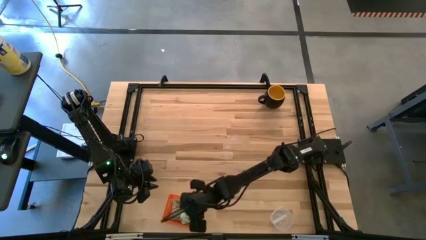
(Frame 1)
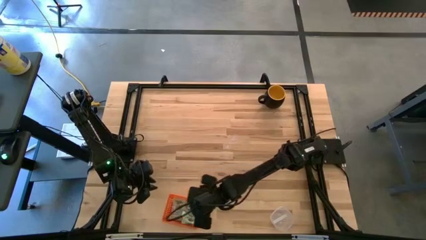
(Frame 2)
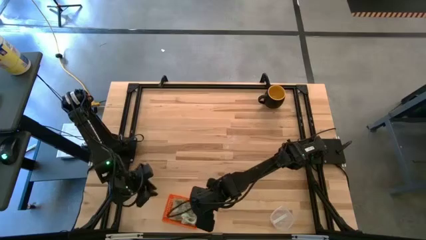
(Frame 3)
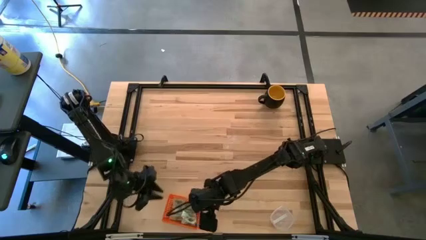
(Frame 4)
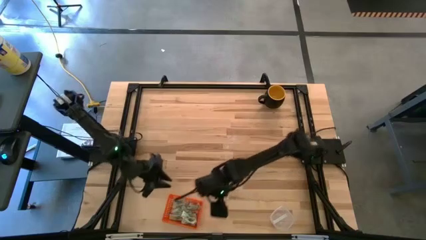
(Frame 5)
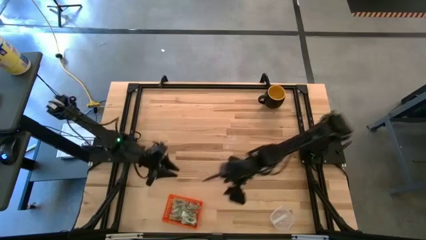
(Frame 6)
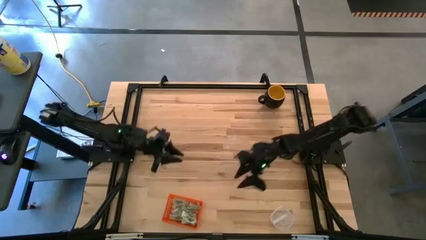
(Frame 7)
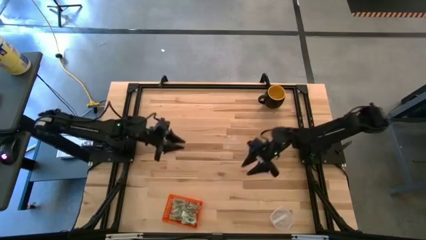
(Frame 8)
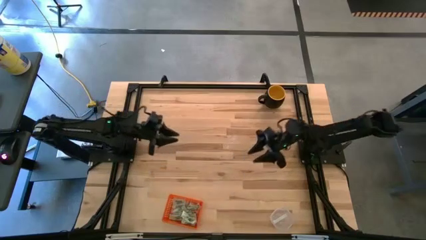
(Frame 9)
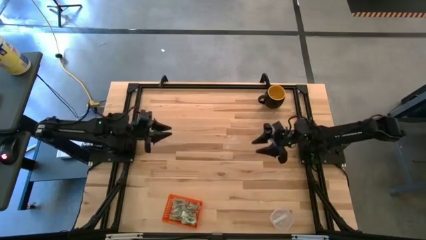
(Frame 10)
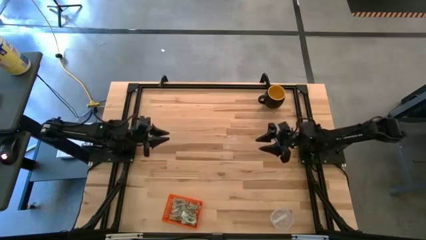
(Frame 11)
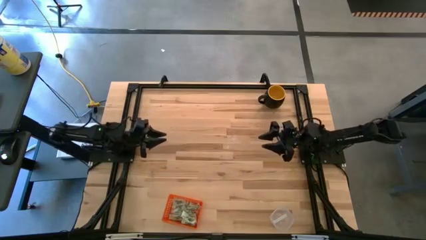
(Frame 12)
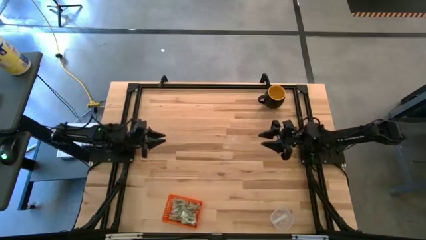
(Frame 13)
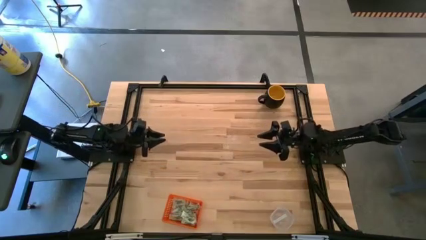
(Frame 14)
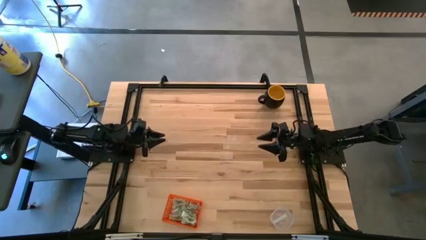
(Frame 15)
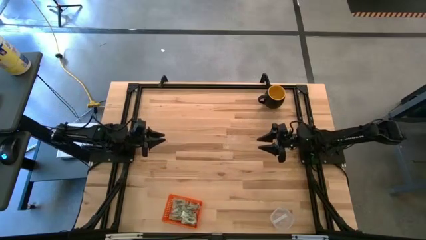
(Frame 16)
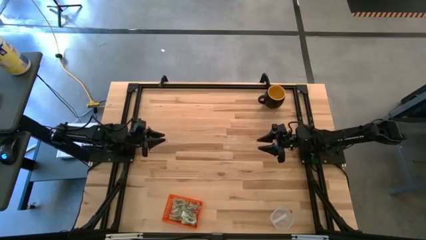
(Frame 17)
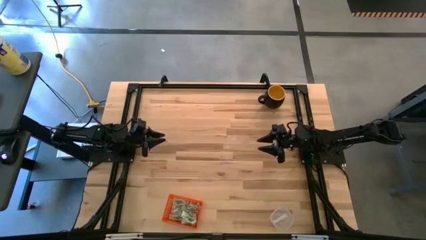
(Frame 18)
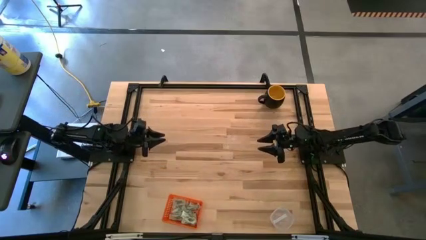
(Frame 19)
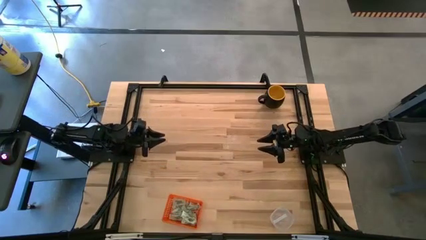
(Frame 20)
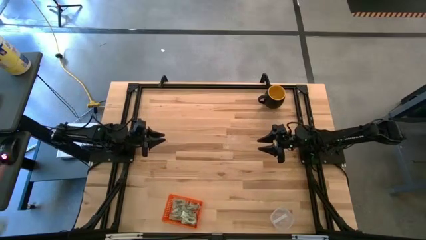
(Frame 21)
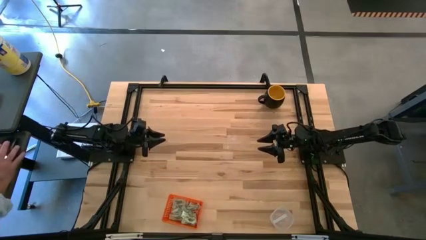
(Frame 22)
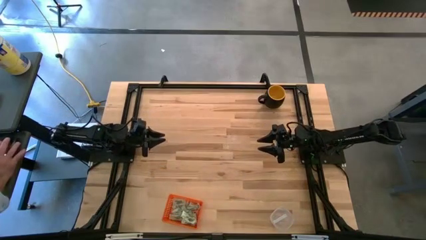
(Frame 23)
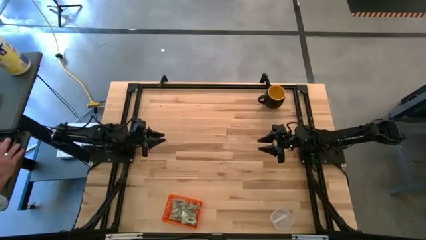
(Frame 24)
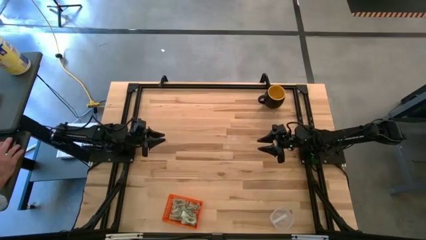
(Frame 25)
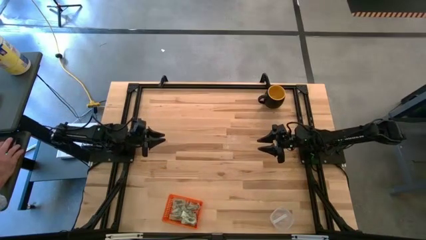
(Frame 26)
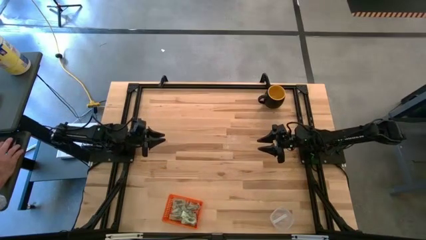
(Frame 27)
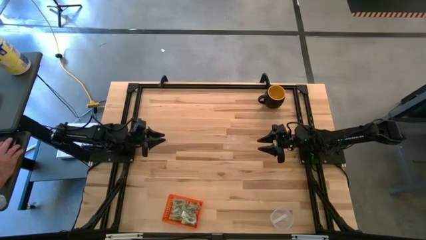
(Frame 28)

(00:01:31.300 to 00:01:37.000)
Task: Pick and place items into bin
Return to Home Position

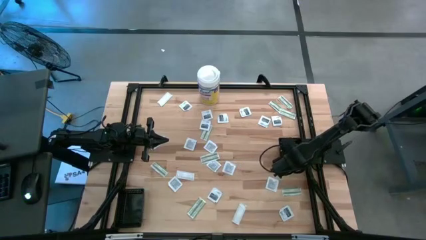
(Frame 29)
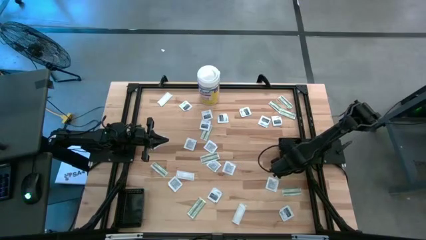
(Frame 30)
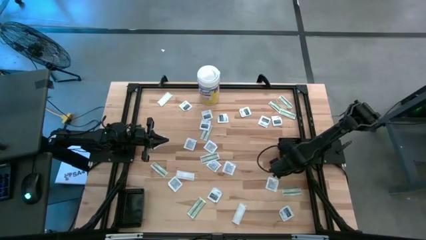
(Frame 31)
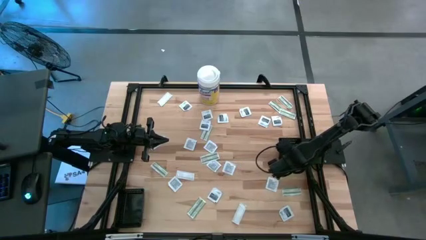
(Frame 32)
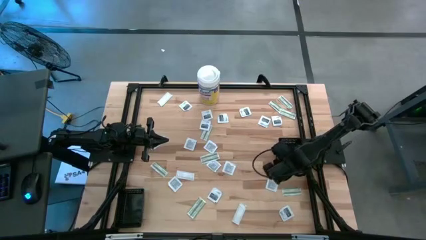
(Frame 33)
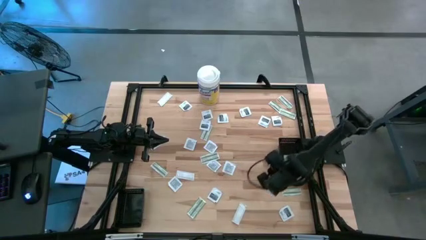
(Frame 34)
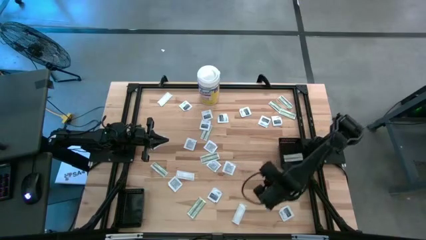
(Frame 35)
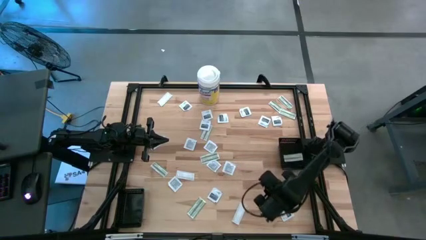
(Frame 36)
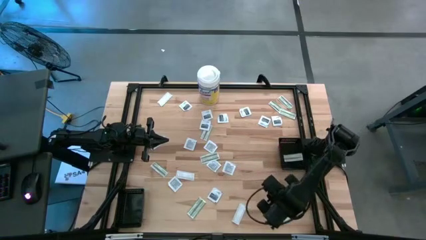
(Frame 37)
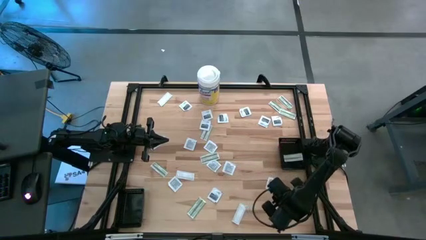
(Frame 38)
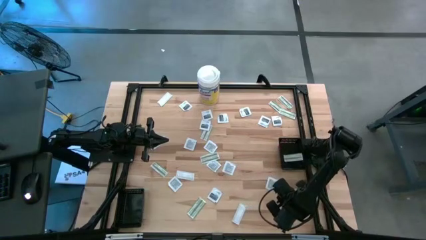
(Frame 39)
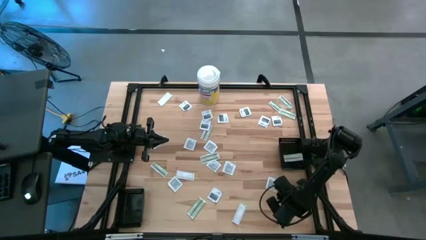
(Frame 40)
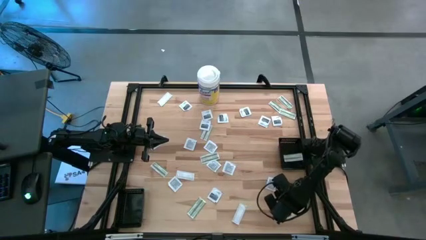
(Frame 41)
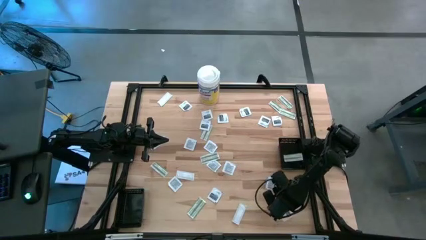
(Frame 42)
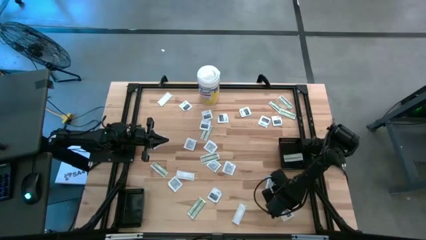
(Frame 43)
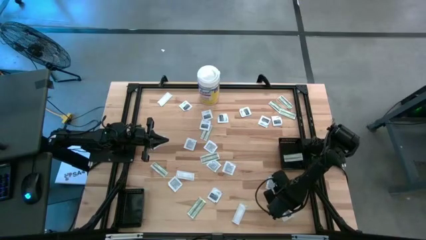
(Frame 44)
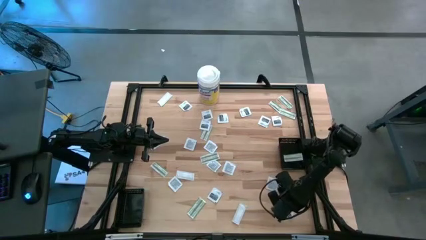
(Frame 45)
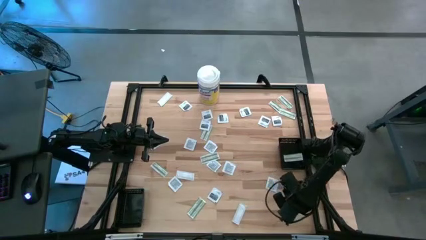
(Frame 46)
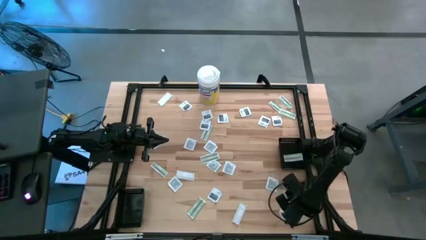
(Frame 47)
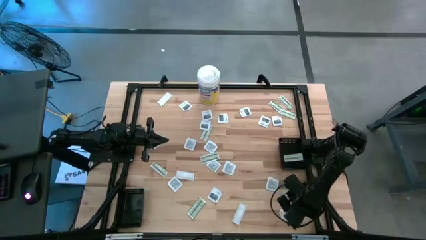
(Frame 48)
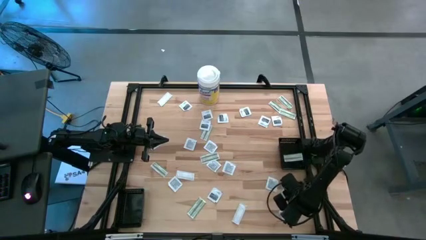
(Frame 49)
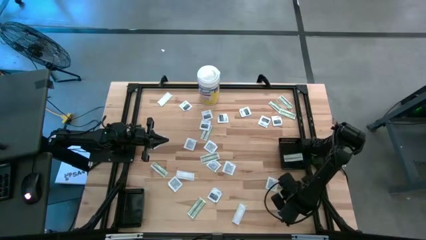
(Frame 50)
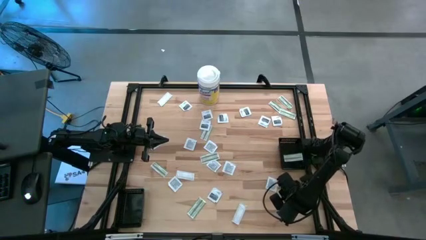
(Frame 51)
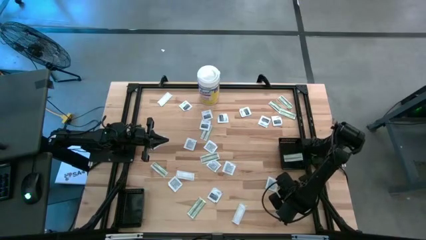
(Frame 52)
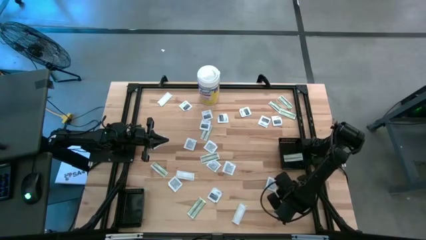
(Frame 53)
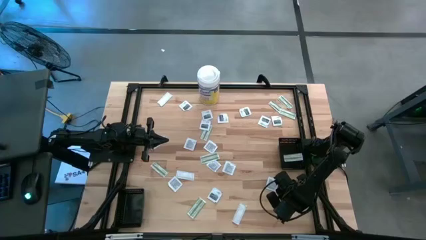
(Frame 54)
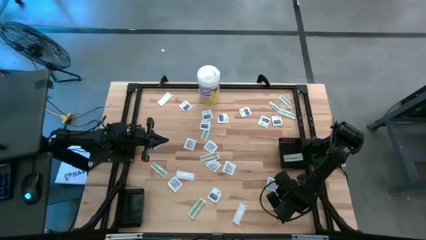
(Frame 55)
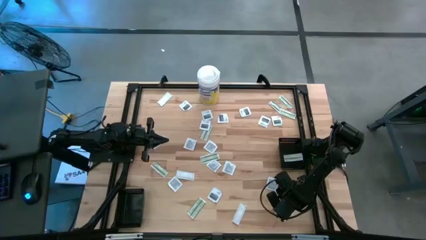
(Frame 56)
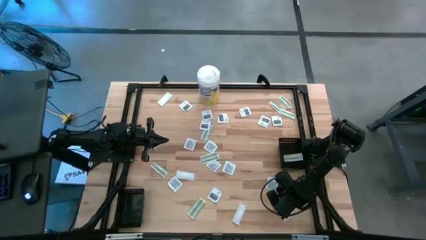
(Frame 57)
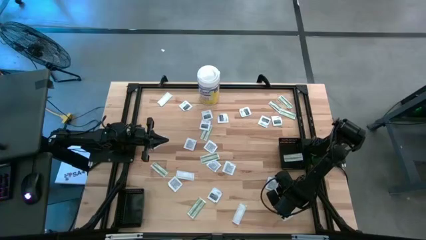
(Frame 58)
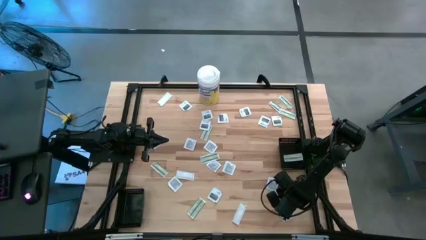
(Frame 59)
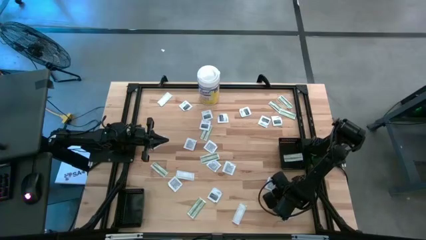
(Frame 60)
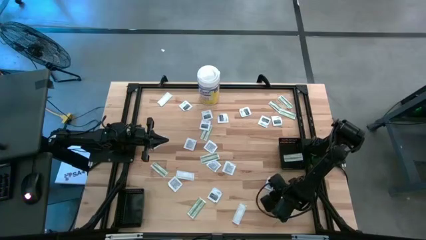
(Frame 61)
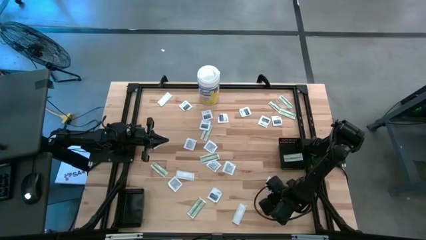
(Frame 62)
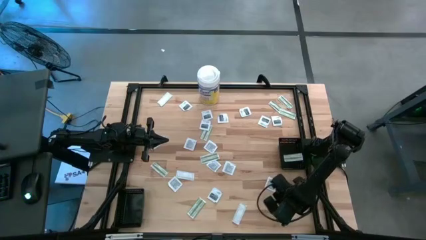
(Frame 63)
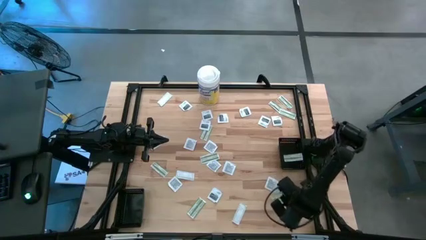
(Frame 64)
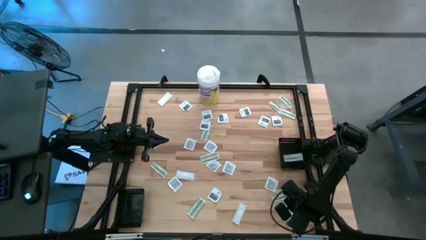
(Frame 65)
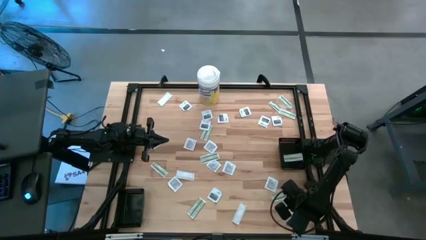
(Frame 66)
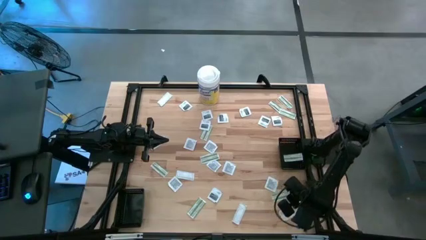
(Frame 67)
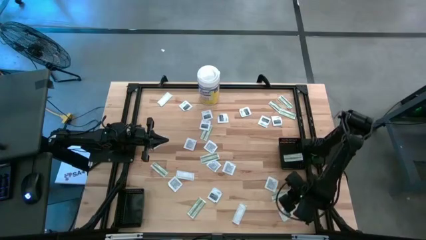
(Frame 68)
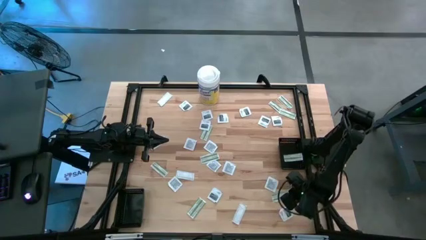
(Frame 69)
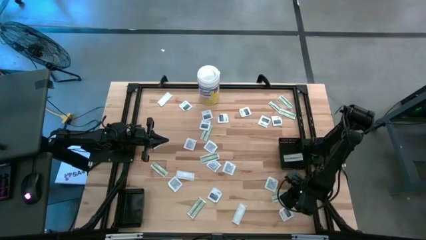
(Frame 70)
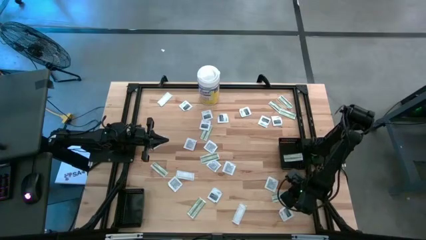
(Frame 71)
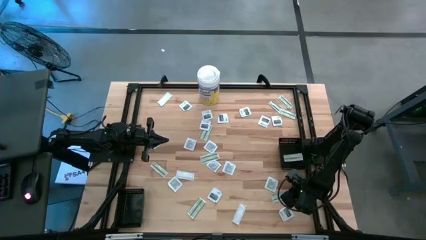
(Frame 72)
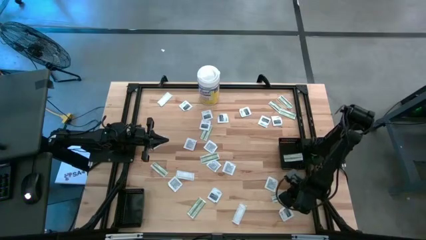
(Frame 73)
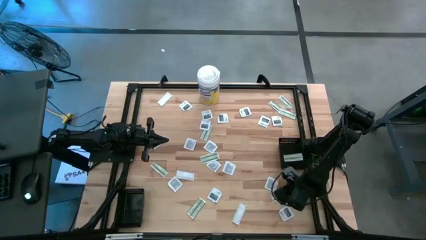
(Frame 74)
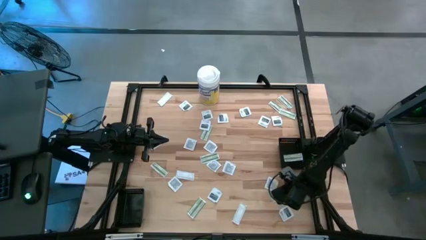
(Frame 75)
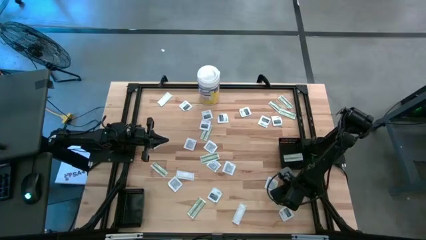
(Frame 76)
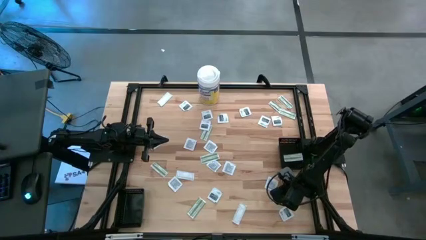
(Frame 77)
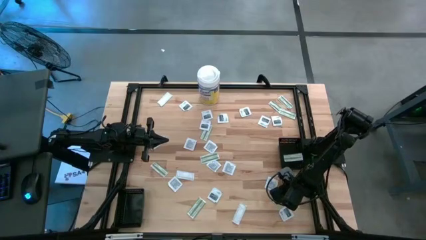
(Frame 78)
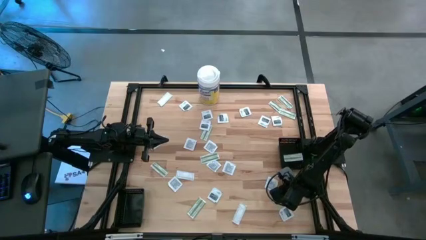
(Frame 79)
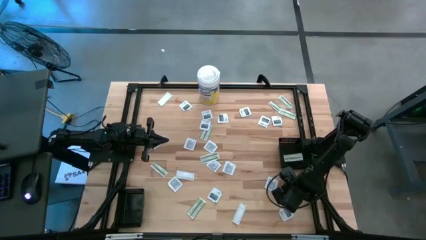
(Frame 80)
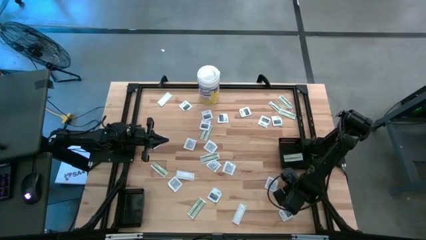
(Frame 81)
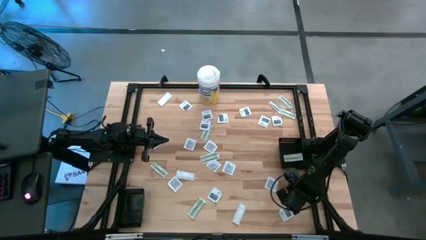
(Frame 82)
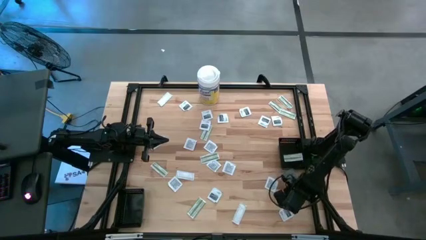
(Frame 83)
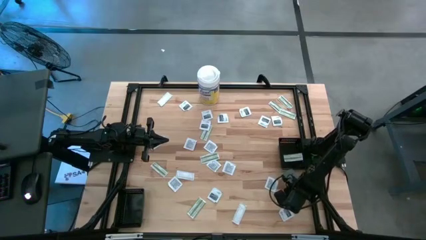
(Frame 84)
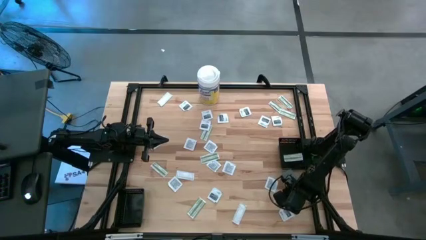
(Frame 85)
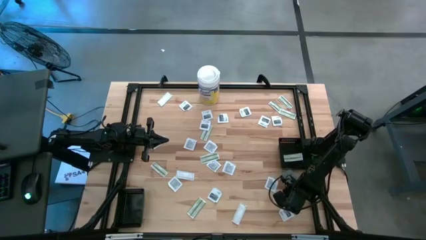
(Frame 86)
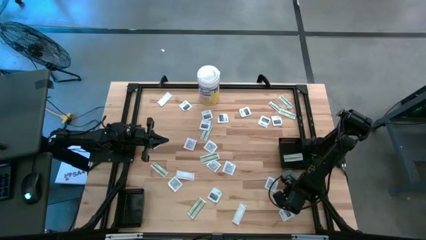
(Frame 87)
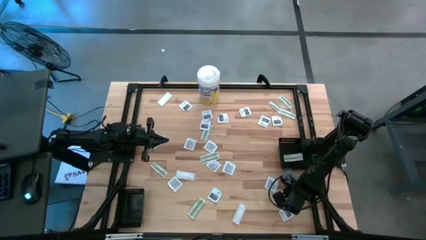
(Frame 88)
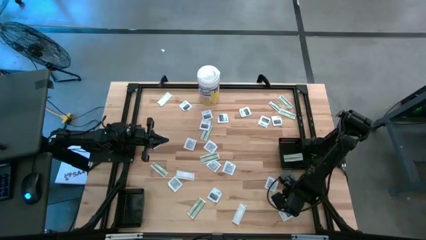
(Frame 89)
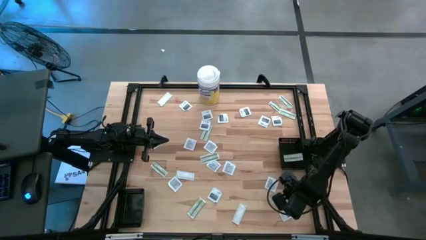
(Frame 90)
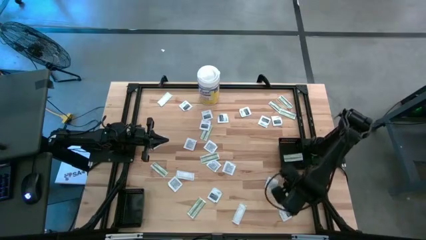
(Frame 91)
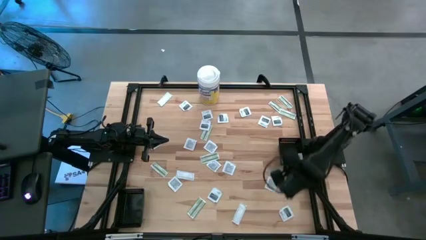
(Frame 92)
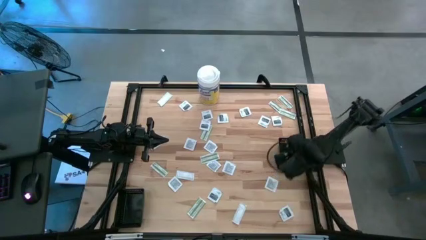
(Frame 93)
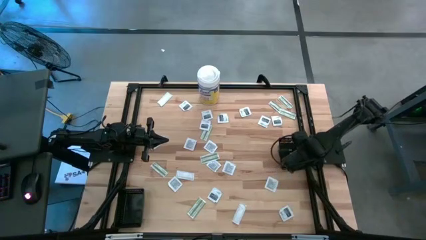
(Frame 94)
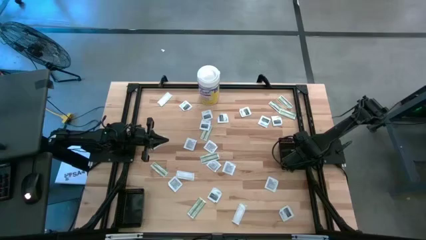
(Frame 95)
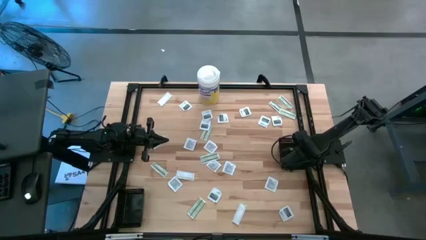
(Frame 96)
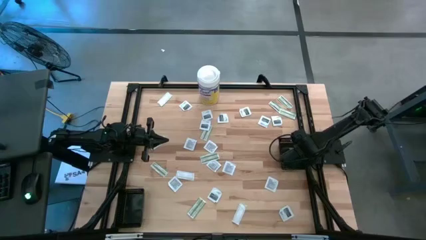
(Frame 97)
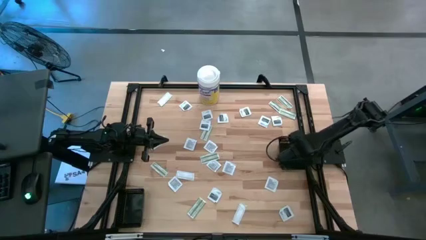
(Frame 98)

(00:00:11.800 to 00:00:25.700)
Task: Pick & Place First Aid Supplies
Put the white bandage pad into the right black bin
